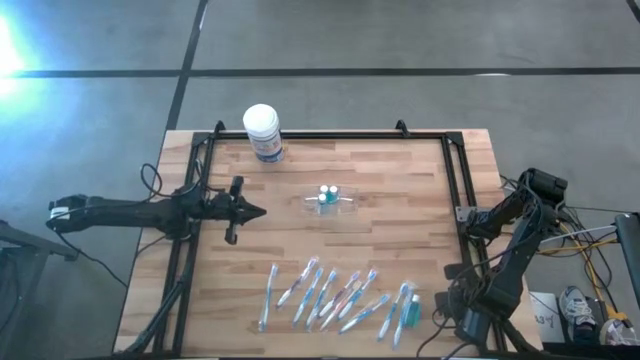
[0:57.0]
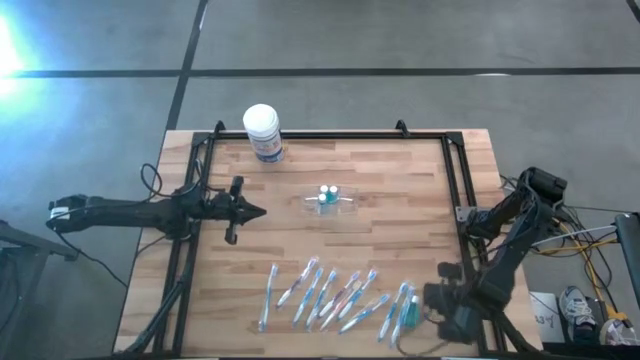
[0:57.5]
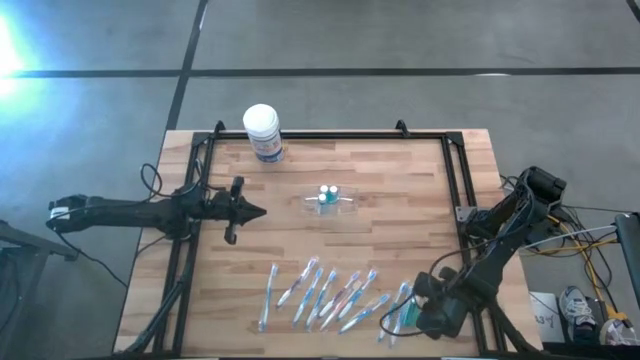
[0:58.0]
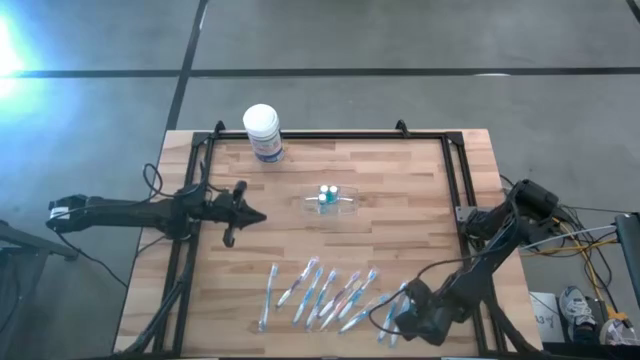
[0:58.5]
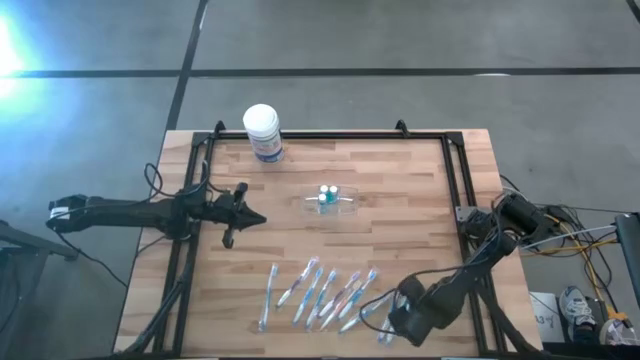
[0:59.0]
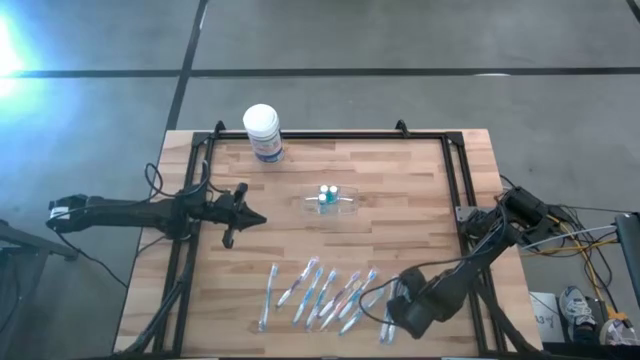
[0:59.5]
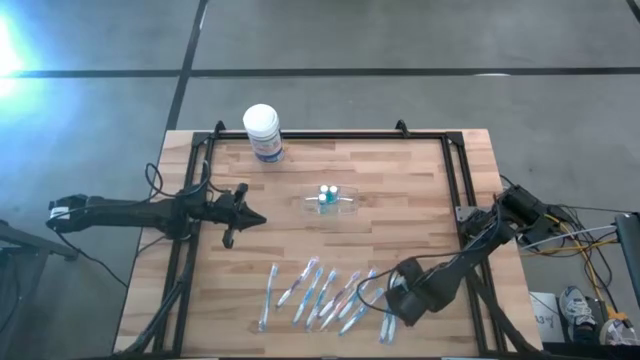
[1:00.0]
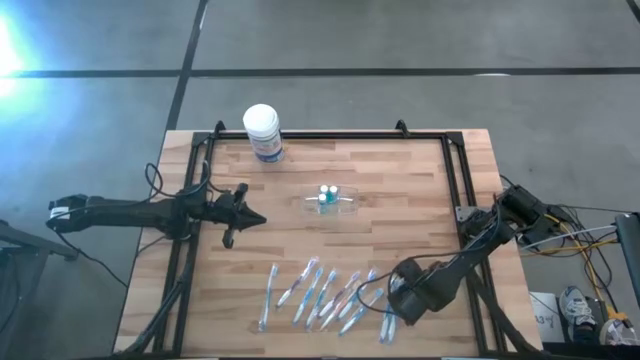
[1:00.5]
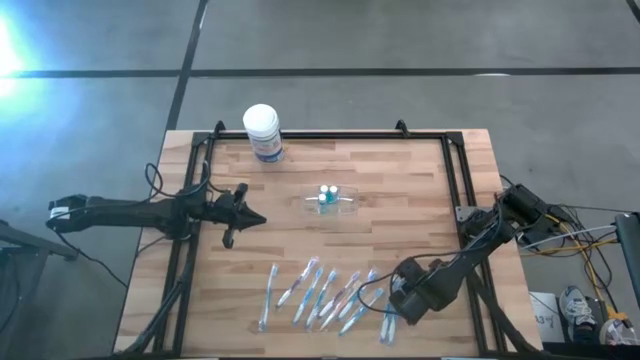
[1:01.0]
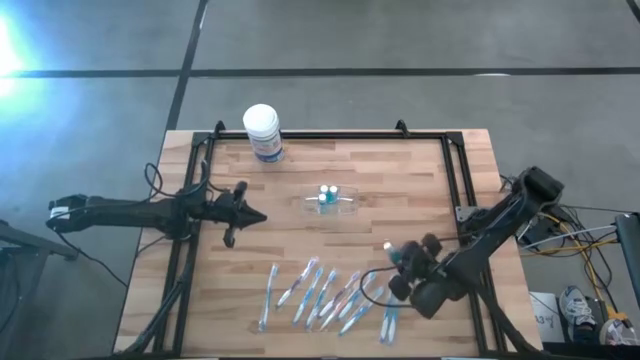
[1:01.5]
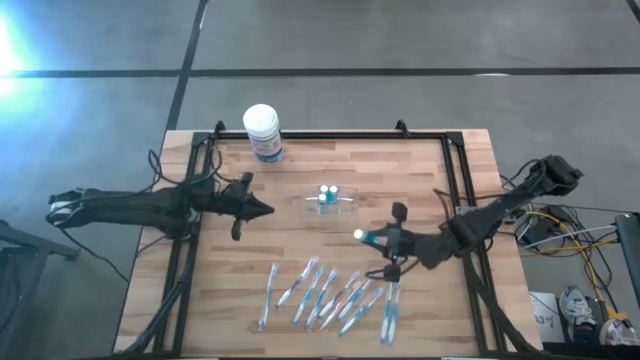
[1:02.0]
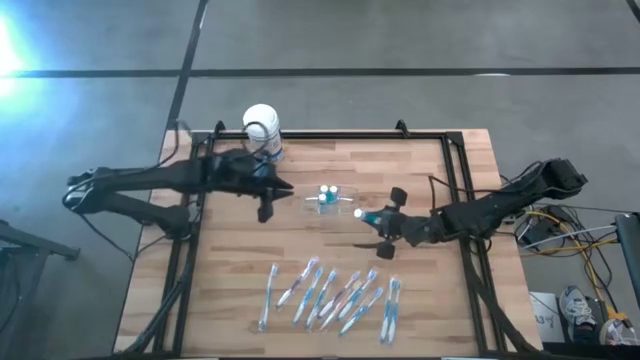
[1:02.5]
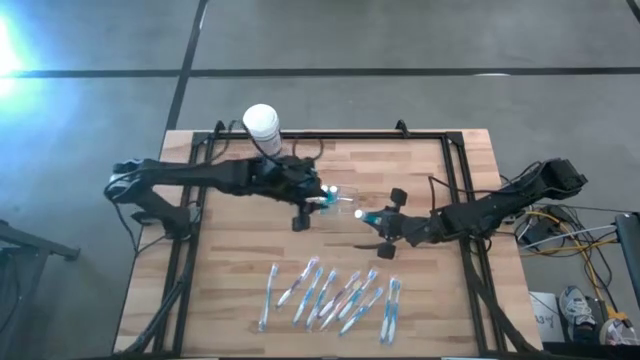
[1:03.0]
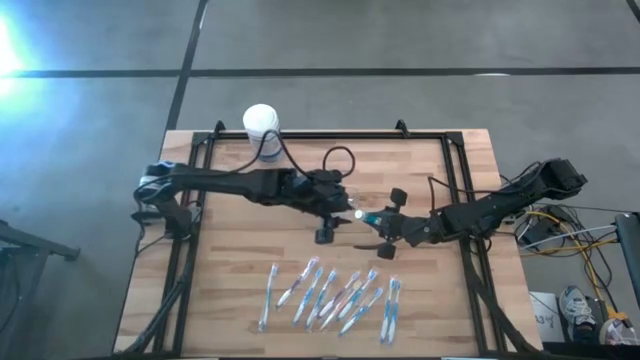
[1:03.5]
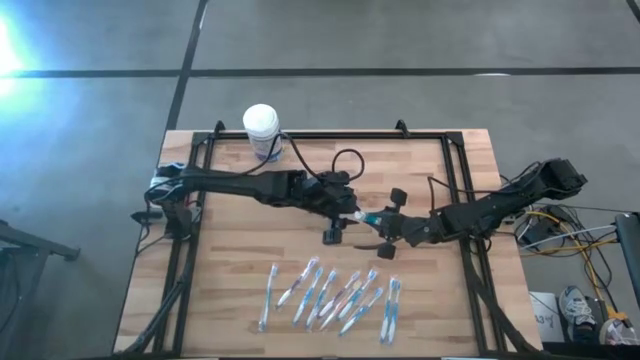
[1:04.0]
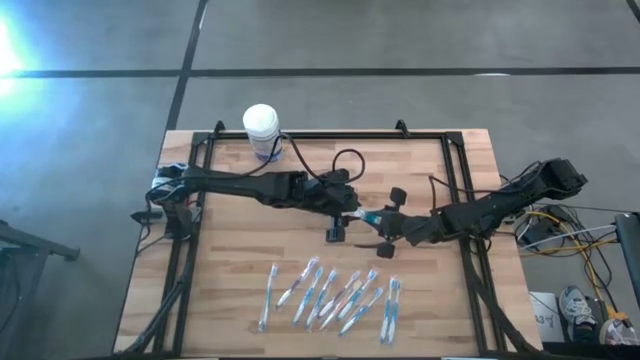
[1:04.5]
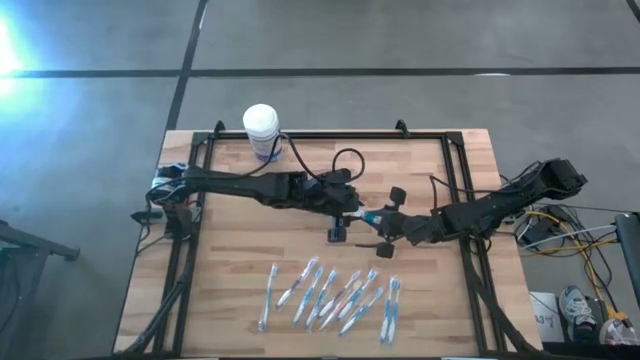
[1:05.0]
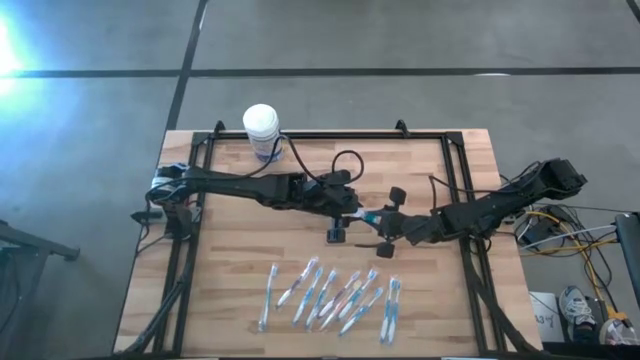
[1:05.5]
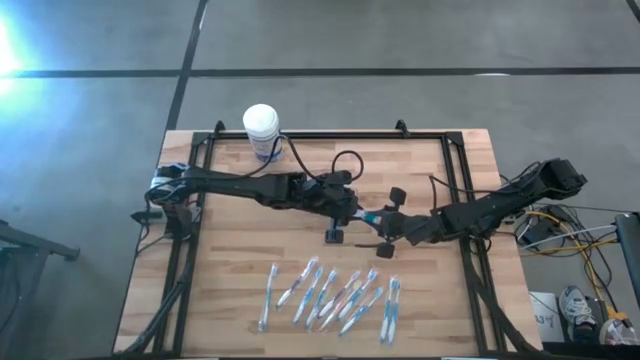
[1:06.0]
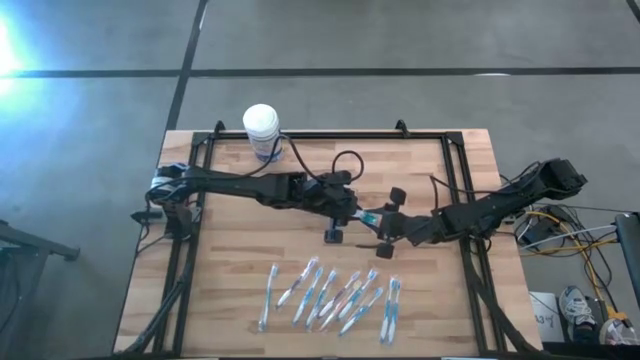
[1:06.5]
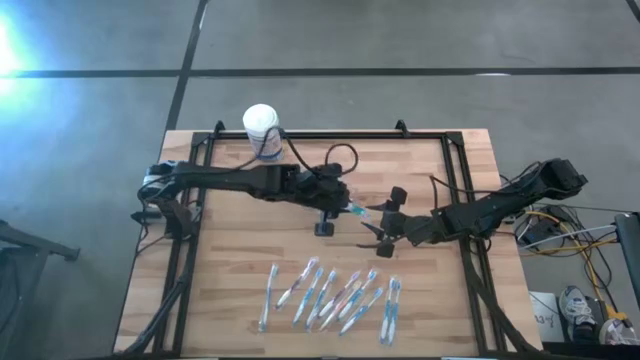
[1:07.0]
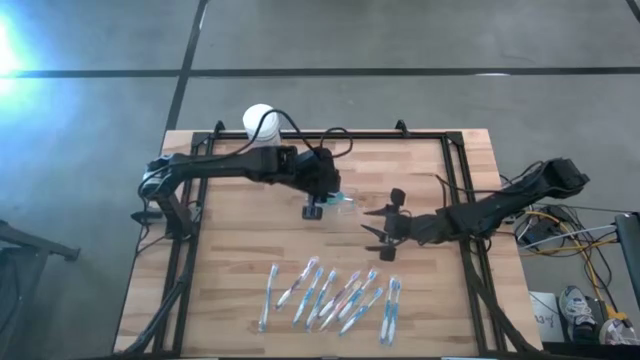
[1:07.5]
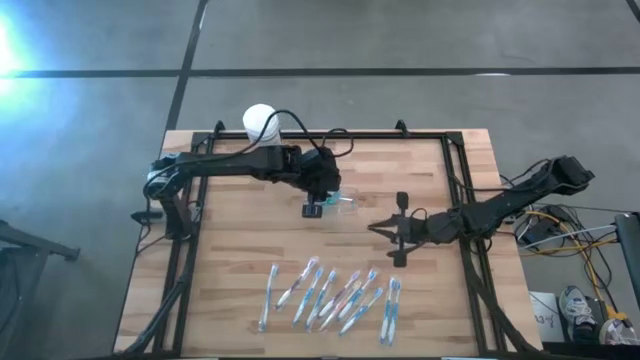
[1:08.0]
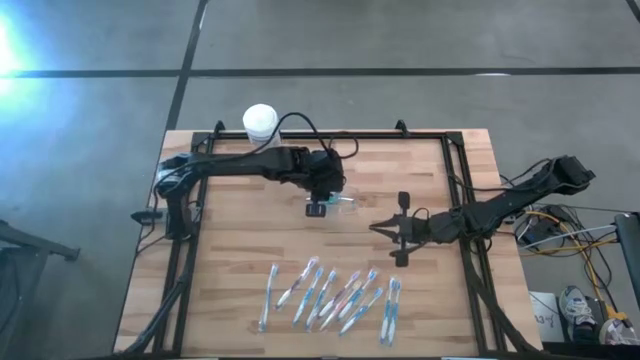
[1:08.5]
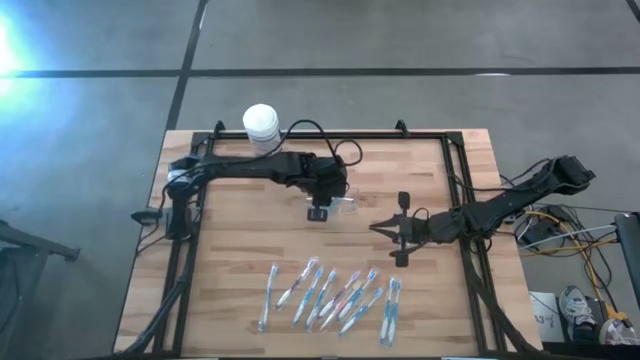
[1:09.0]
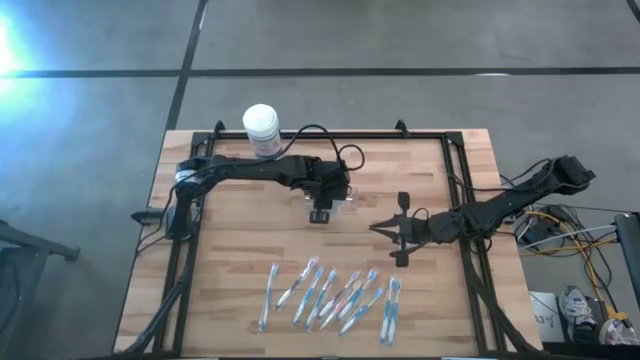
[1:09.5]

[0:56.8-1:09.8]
Task: Pick & Place toothbrushing station
Put the blue mouthwash into the transparent bin organizer

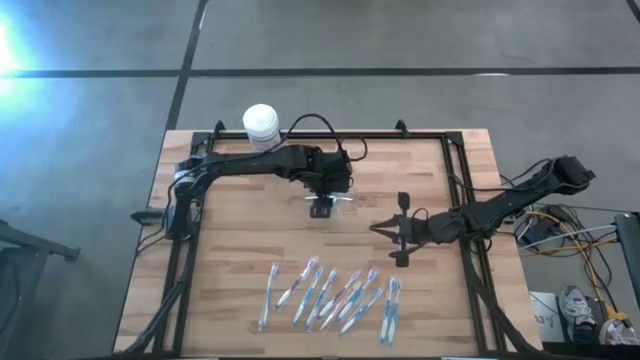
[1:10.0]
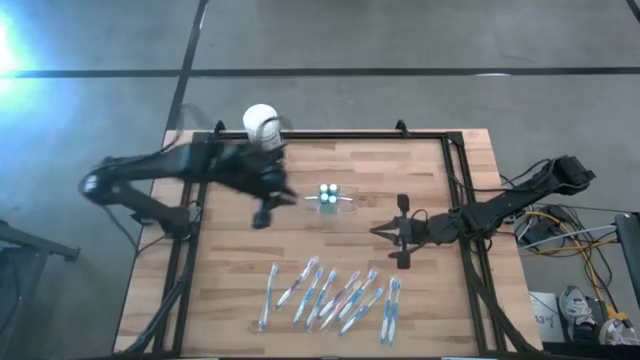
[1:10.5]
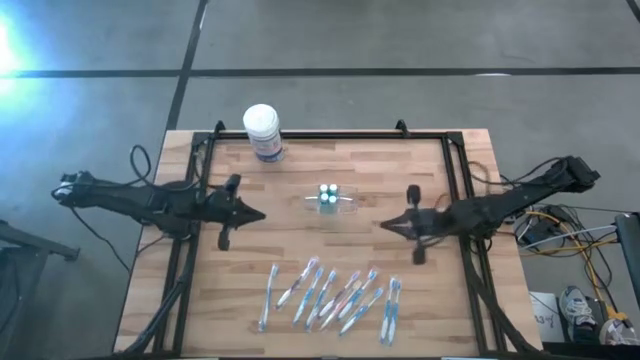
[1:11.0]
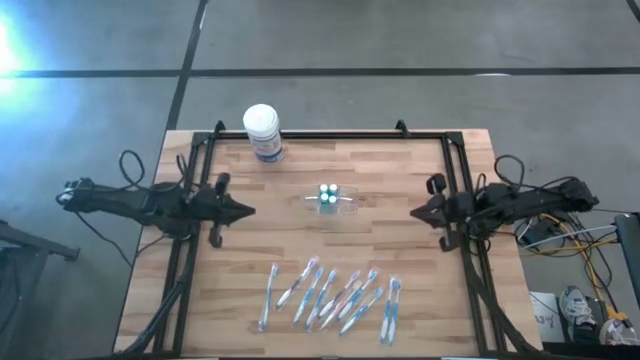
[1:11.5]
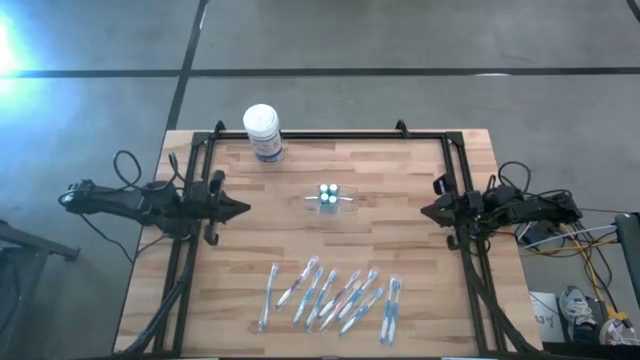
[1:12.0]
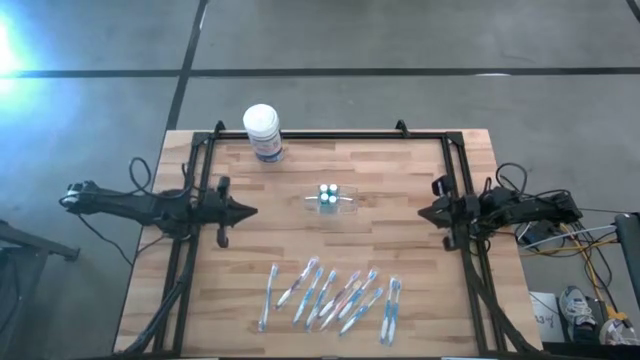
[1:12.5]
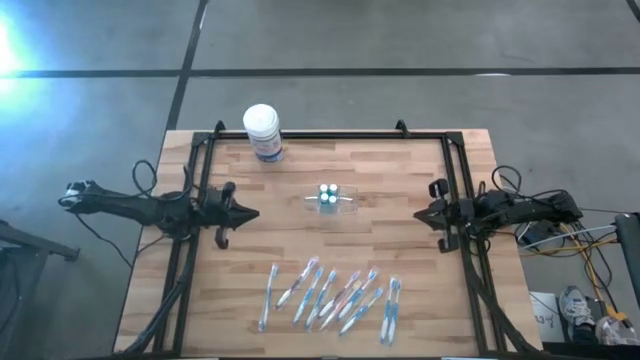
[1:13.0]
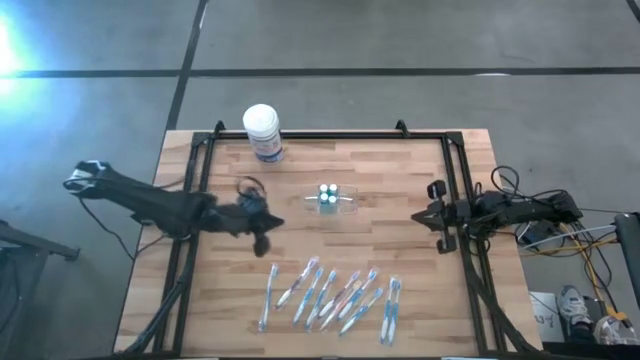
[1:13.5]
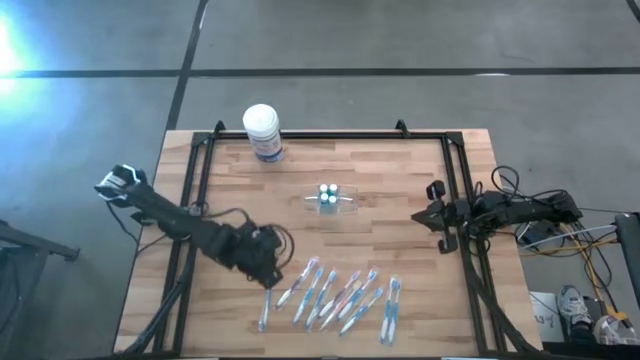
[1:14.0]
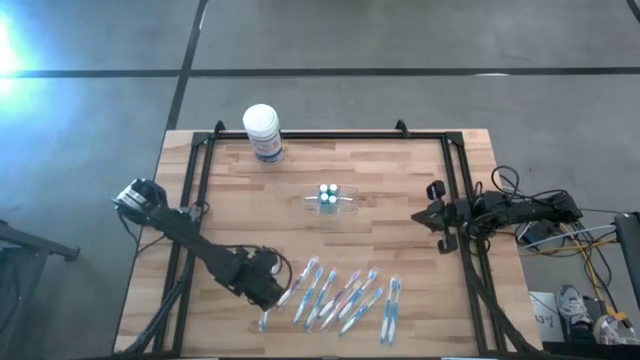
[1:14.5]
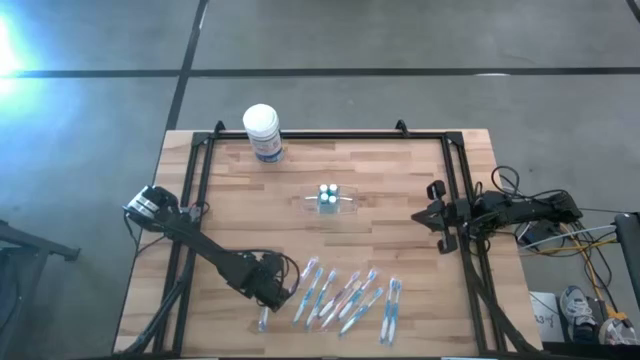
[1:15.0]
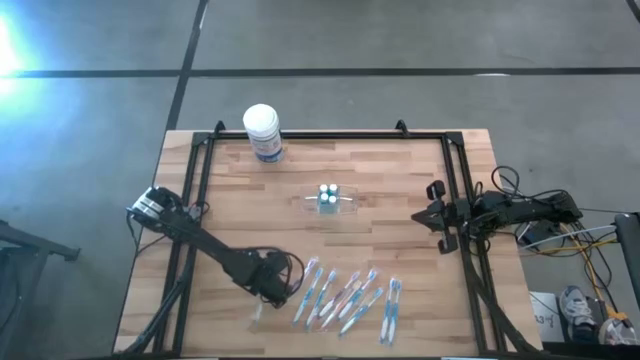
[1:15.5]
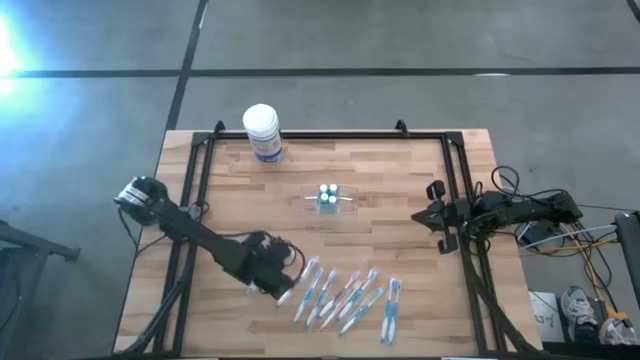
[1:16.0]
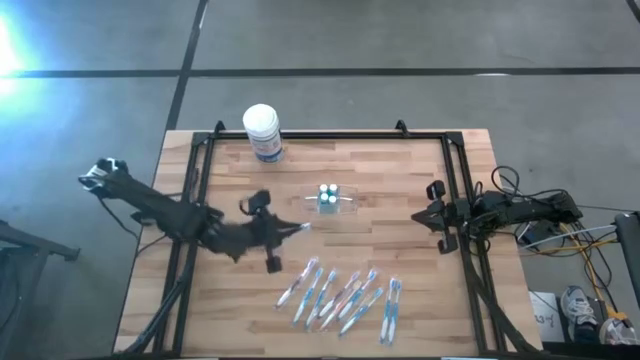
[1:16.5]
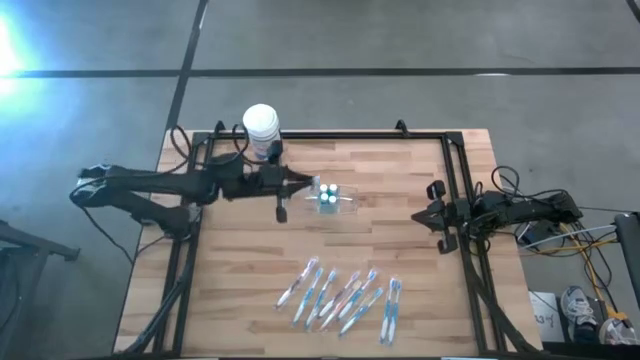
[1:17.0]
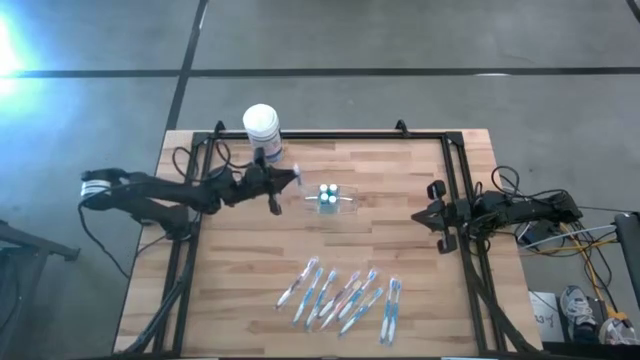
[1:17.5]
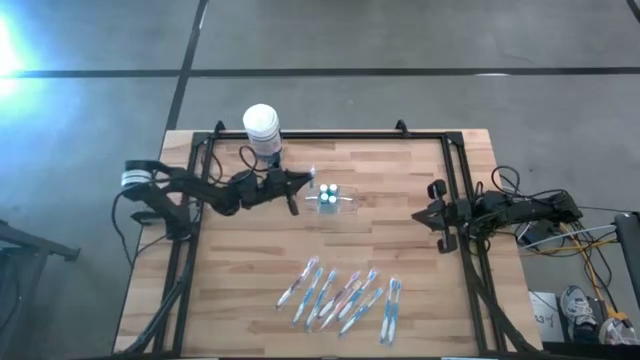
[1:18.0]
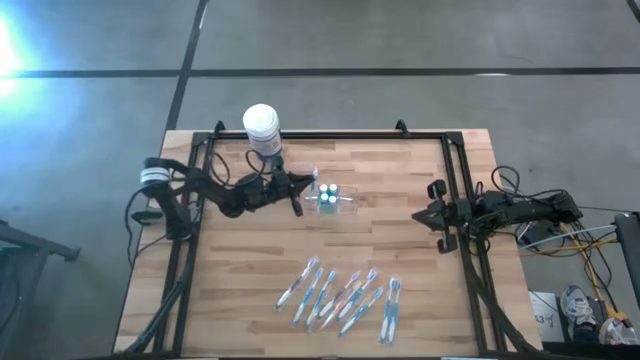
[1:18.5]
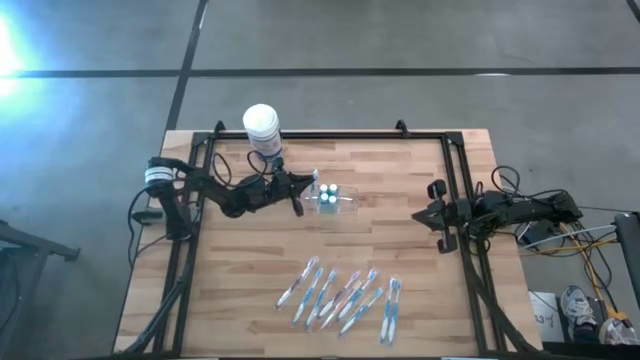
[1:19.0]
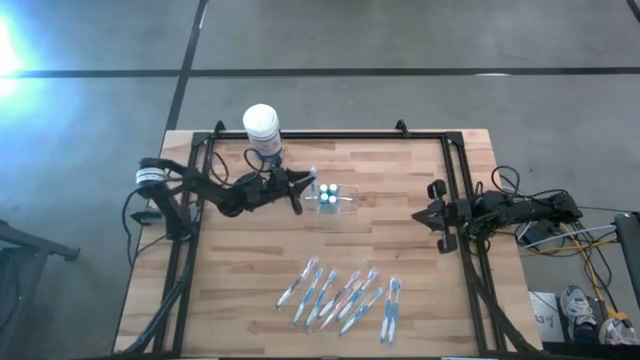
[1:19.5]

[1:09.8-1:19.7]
Put the blue toothbrush into the transparent bin organizer
